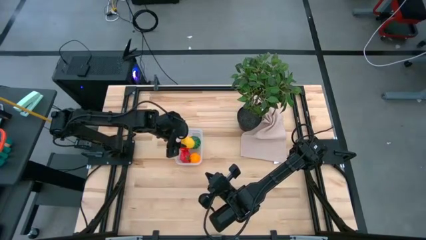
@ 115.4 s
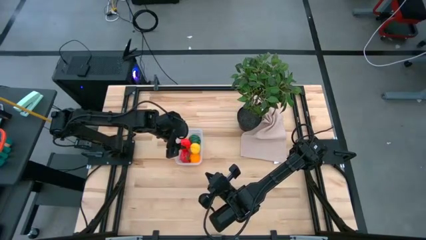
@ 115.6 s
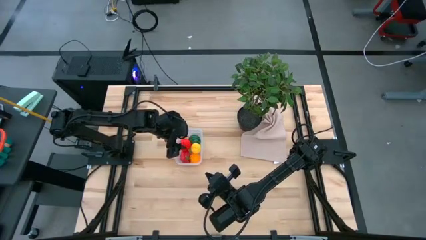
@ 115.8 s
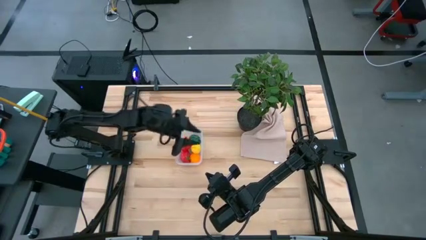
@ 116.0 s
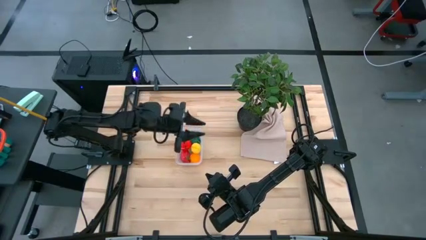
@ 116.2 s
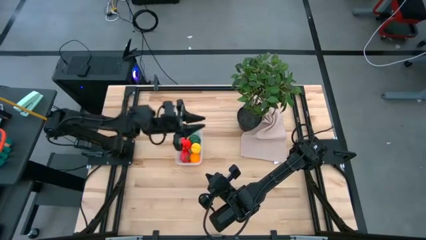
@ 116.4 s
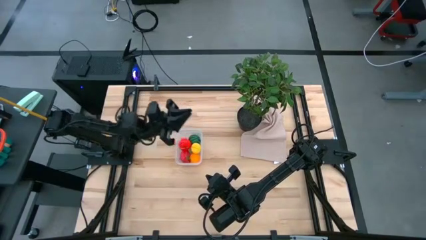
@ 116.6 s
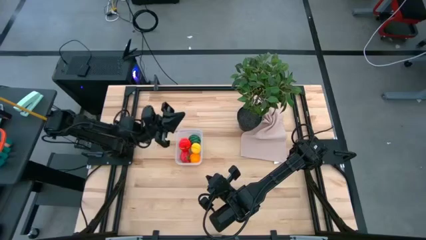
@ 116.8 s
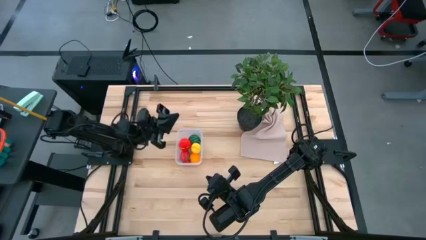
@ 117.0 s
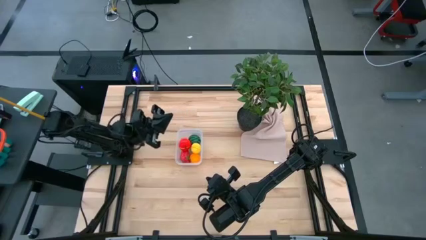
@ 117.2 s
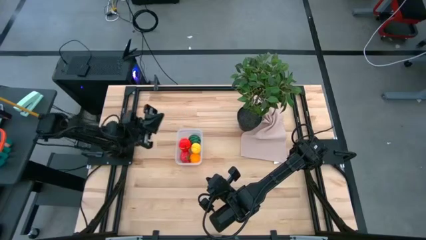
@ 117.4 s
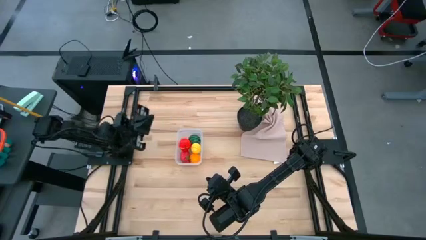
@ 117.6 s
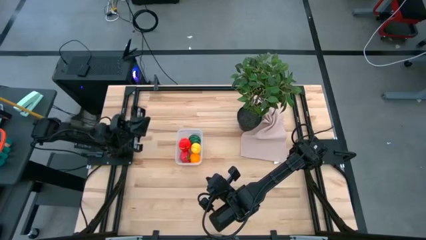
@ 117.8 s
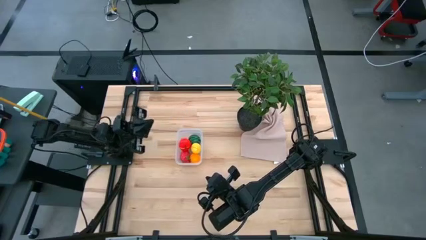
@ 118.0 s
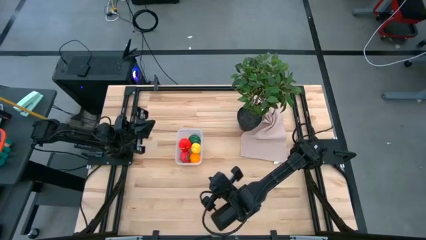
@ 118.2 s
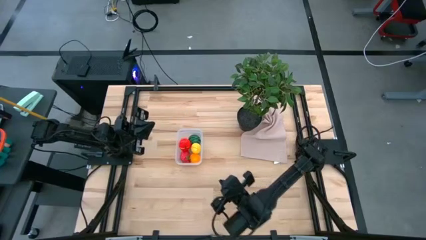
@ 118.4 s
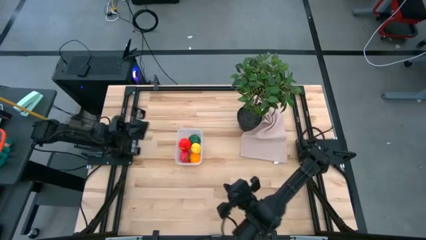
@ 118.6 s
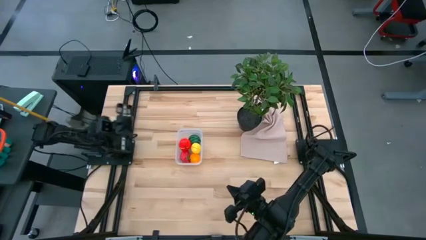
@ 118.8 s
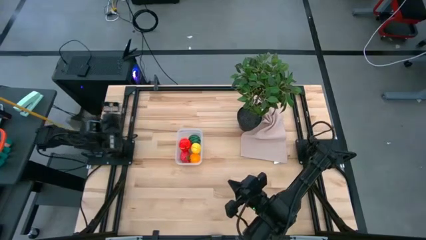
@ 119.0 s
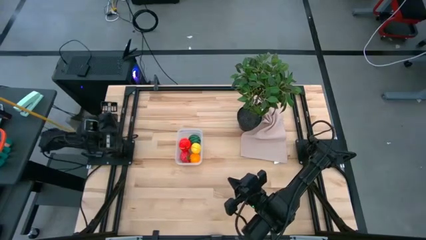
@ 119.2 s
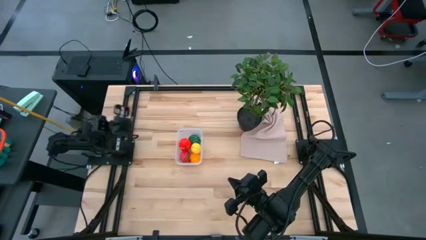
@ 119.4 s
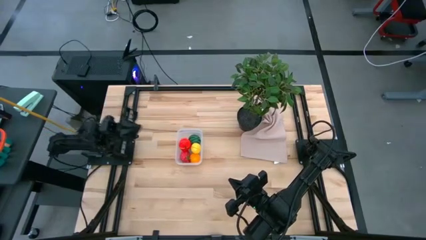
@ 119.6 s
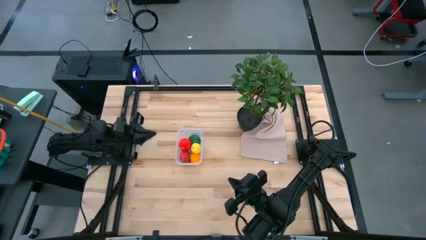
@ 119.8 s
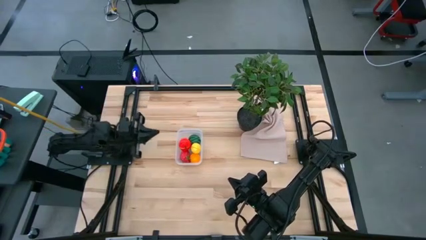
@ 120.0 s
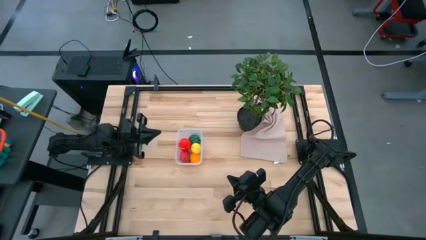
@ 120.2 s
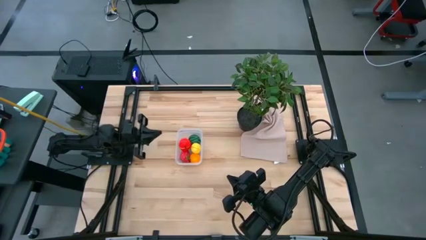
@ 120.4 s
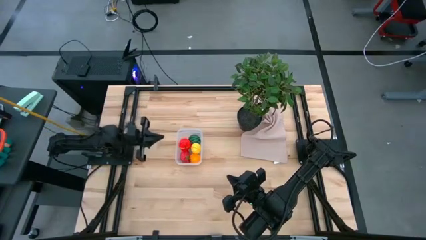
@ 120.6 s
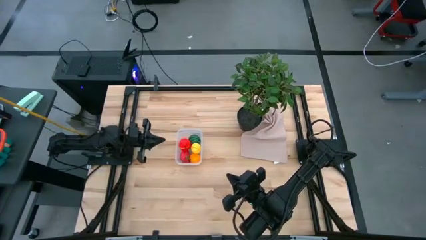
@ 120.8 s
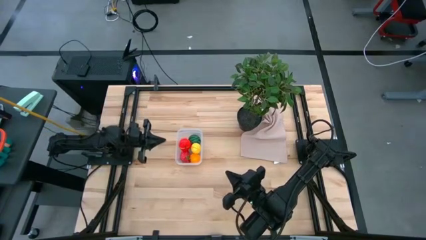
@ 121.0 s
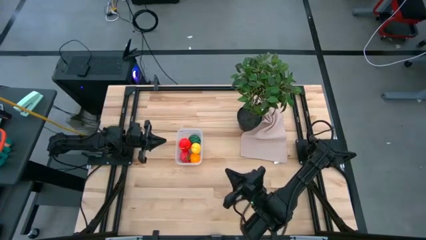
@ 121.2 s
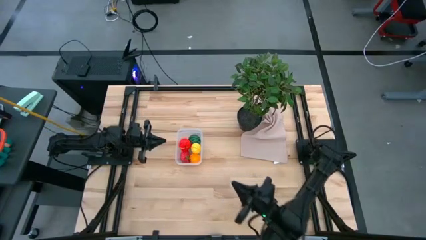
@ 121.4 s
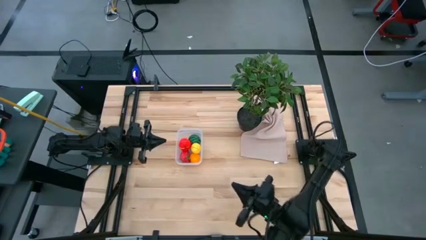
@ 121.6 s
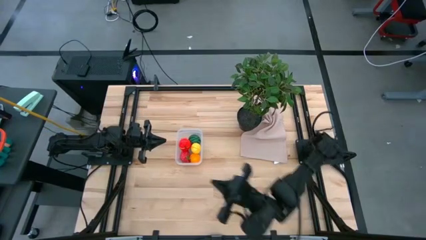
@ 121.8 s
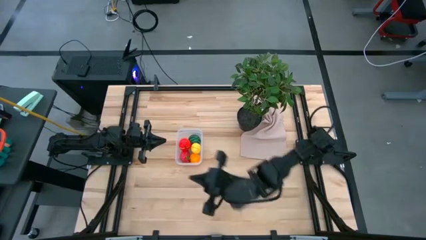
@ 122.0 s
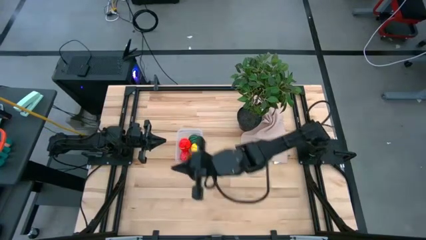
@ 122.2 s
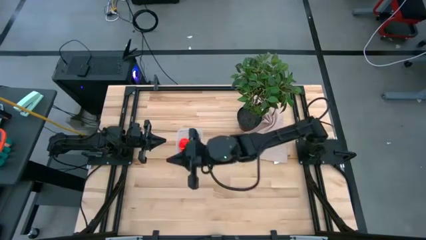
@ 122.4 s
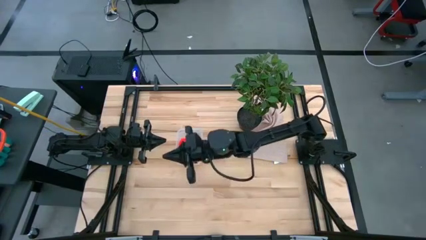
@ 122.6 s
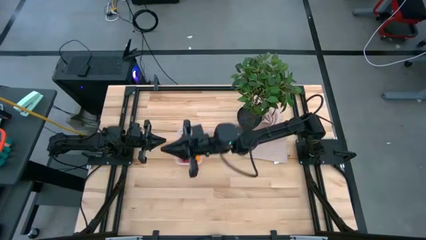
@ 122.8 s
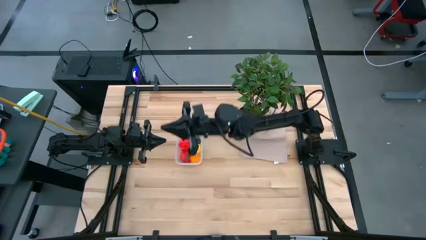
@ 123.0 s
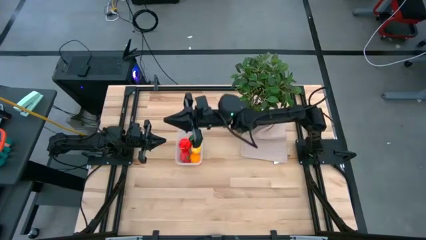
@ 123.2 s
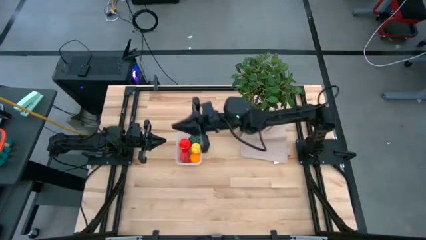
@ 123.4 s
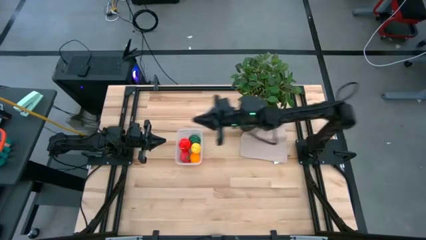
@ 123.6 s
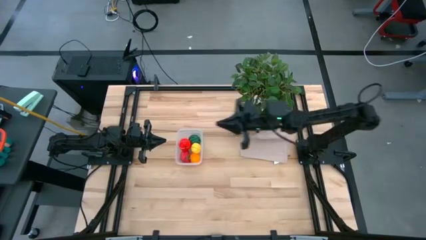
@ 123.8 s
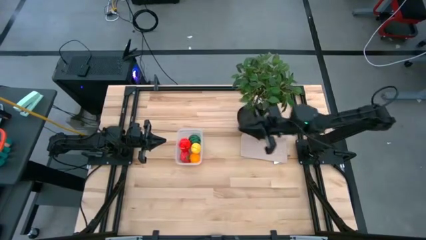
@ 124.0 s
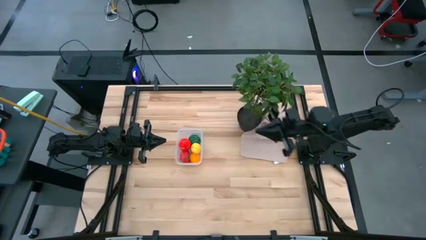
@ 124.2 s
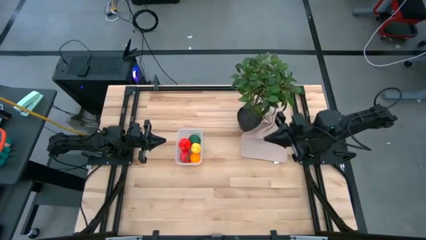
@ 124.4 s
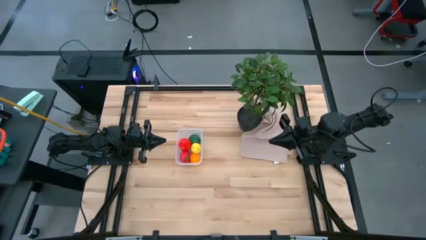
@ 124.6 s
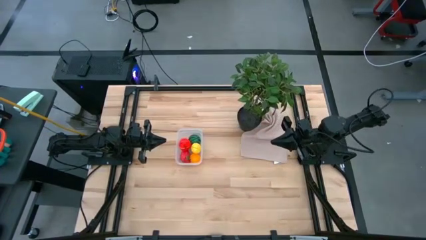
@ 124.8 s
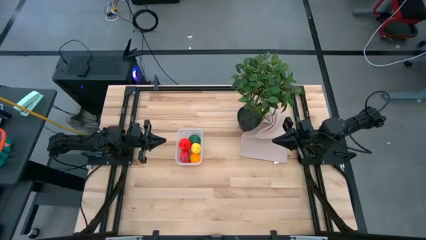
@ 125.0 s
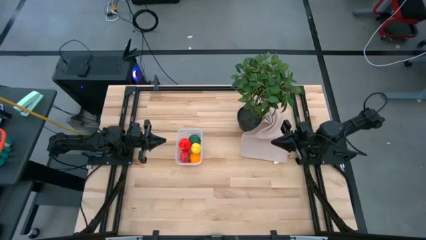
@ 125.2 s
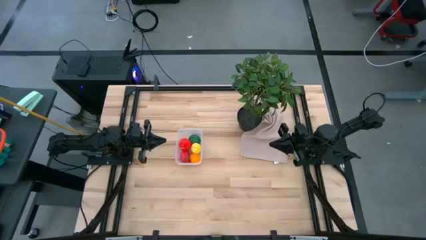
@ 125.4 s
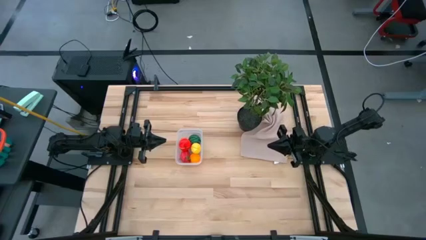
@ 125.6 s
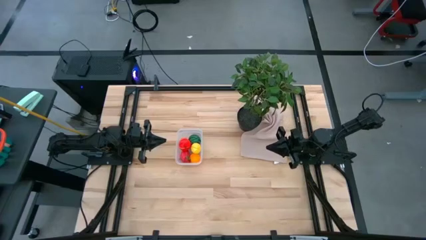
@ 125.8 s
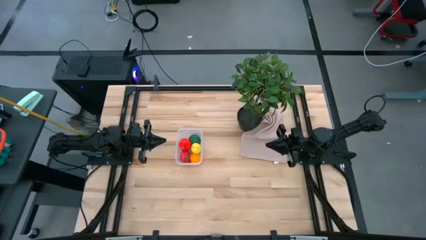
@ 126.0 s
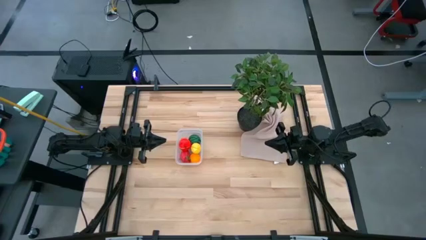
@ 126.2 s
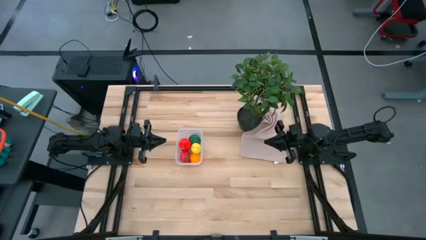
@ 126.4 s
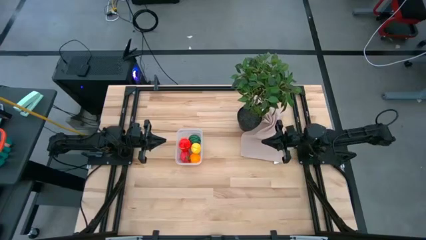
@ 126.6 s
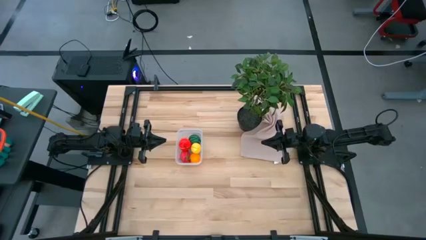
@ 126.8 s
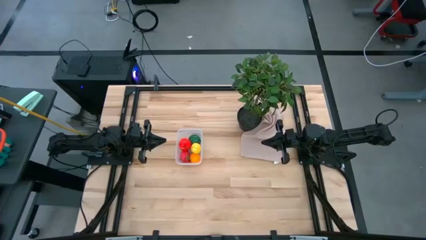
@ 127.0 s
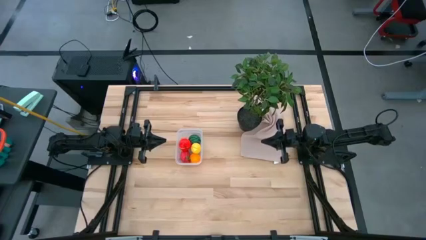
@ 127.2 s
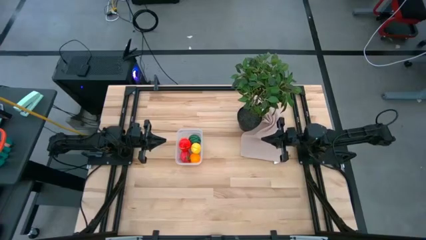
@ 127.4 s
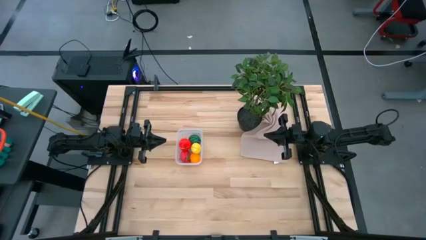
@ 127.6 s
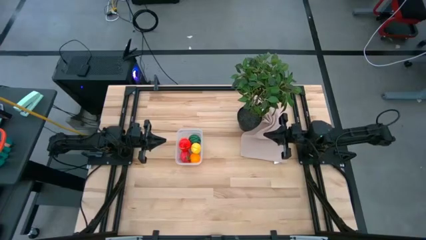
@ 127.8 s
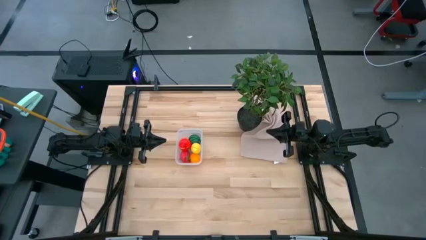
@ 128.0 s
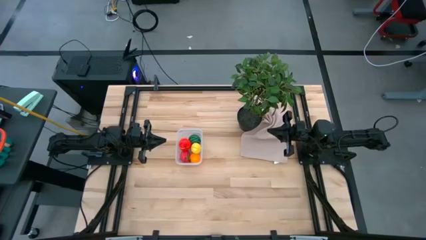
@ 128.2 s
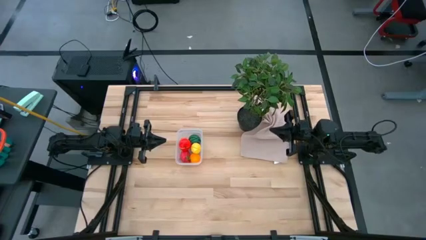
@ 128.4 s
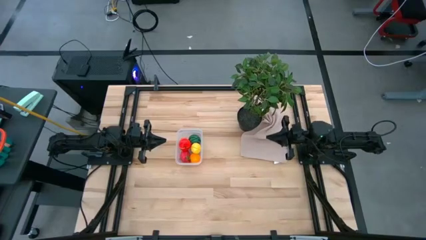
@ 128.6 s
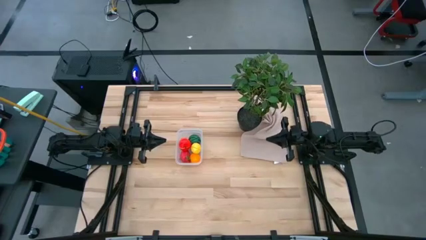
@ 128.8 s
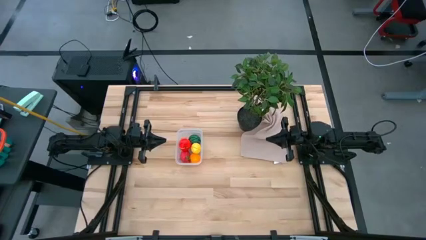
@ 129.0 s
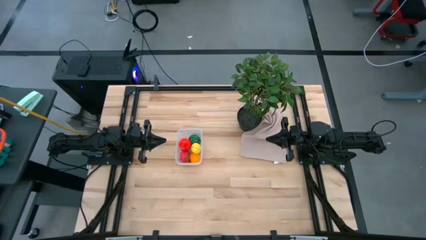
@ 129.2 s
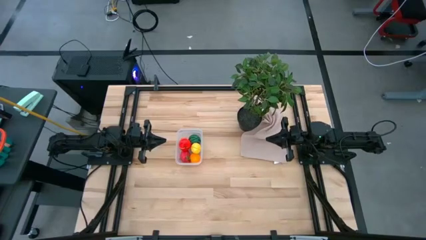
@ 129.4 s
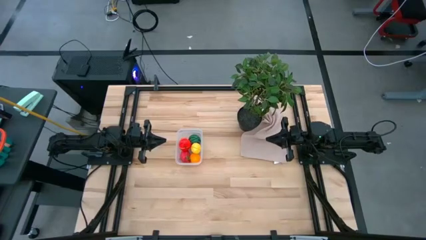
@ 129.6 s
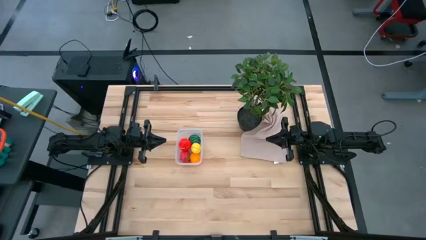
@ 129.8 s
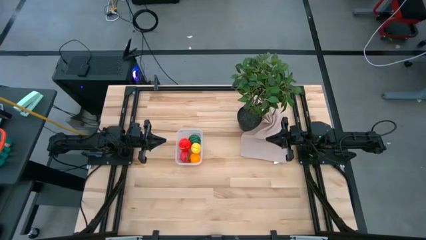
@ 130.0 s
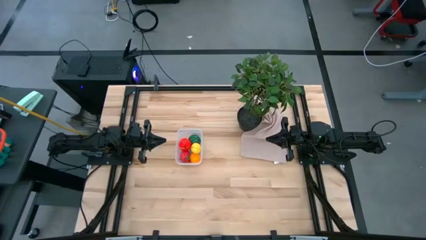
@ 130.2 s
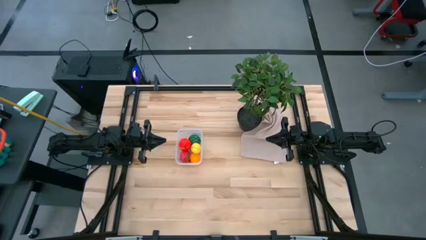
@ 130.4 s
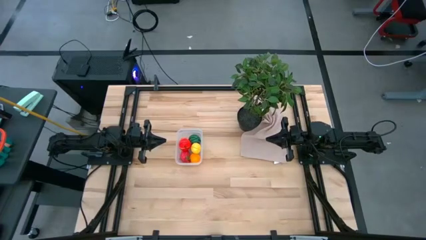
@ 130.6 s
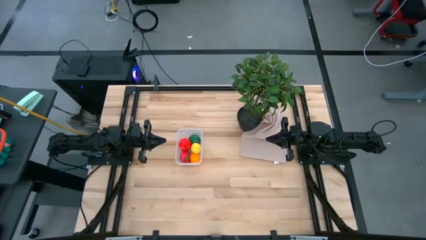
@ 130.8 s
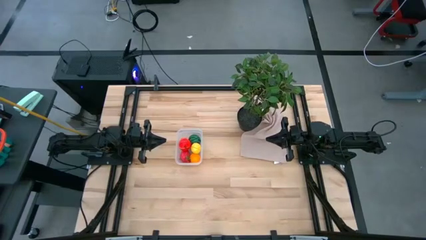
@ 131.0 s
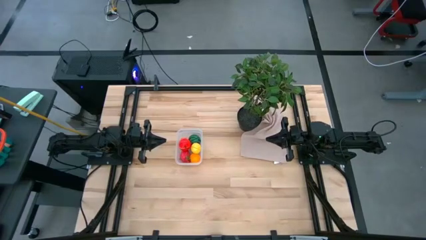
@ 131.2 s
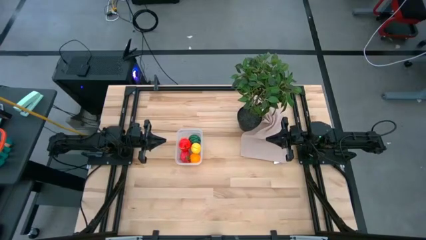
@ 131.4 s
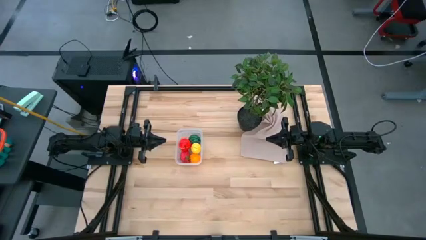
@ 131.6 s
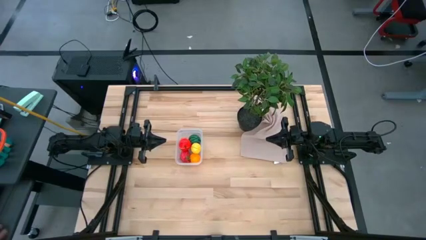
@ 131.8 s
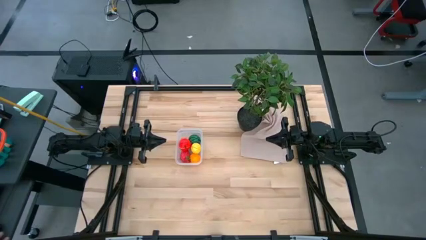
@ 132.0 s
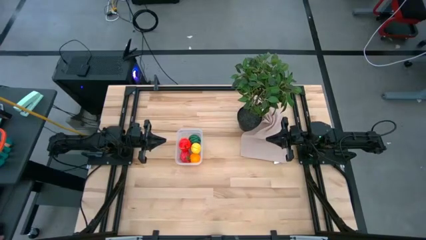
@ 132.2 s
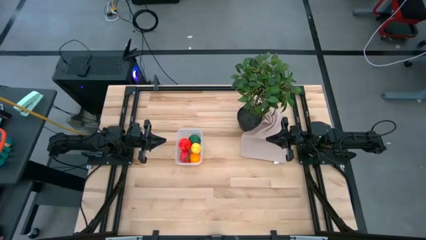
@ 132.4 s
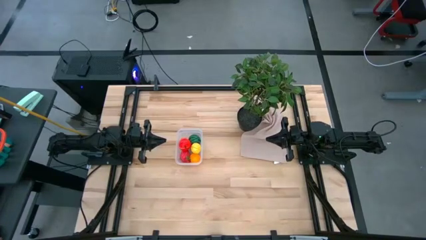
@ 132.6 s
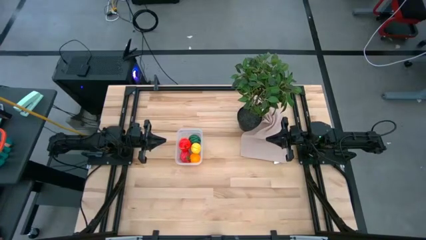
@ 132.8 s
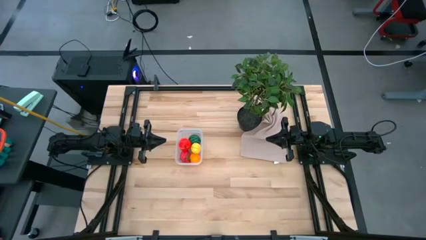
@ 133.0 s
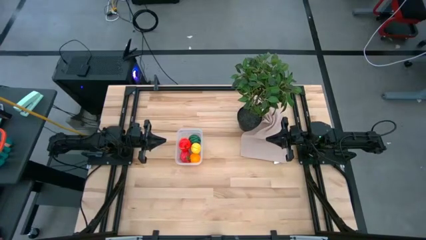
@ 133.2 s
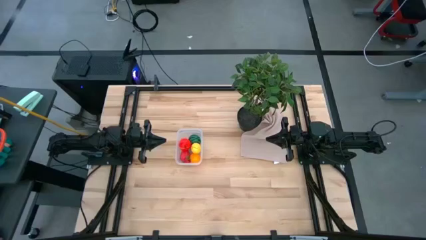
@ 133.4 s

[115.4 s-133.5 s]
Task: Pick and placing Produce into tupperware
Return to Home Position
